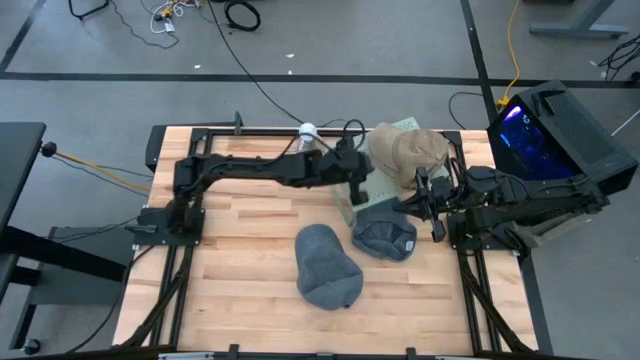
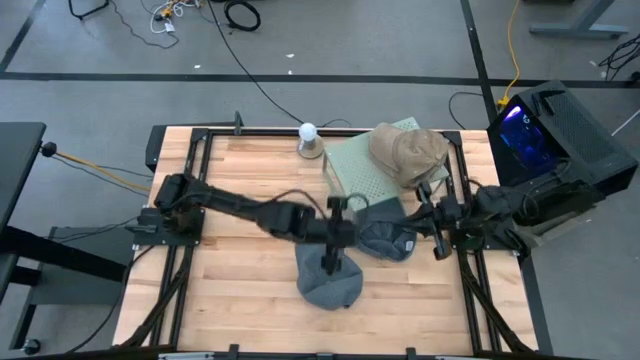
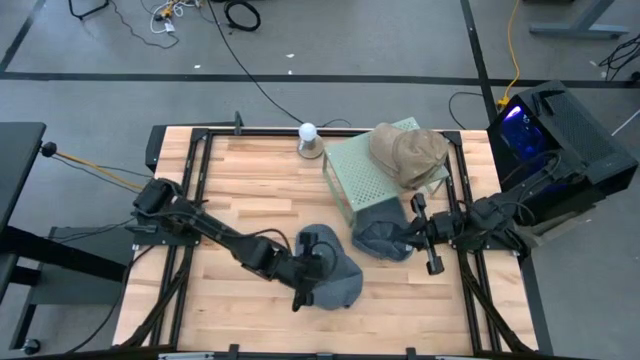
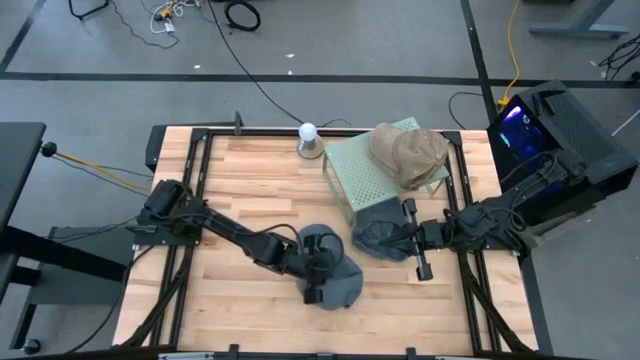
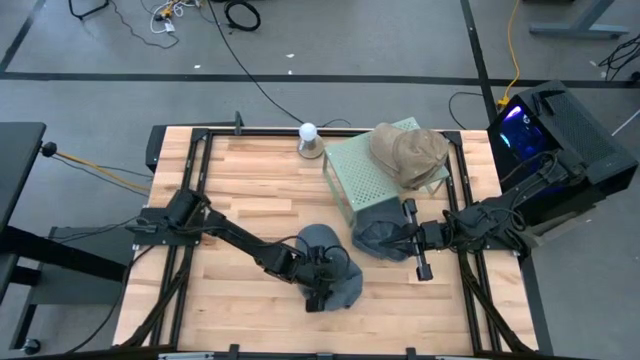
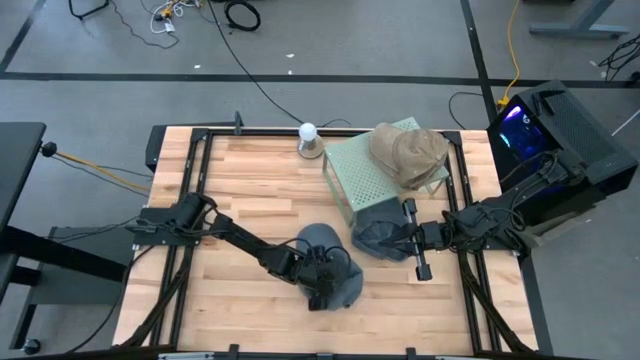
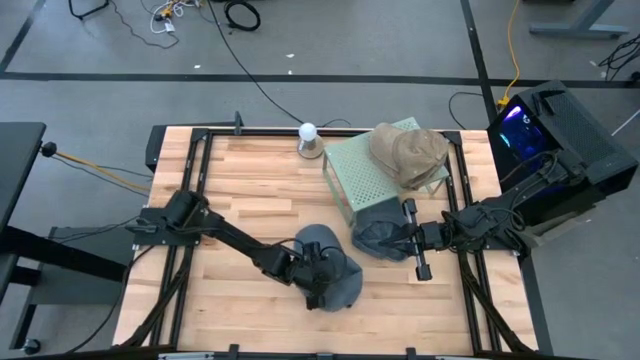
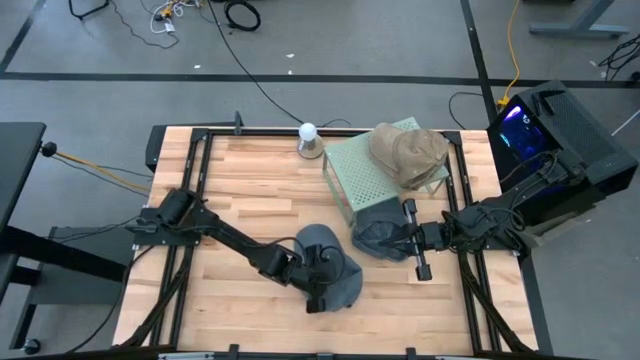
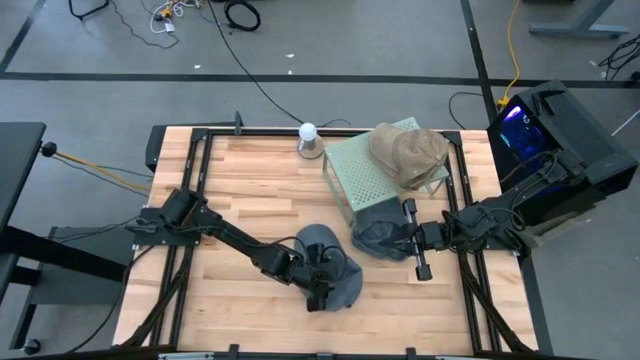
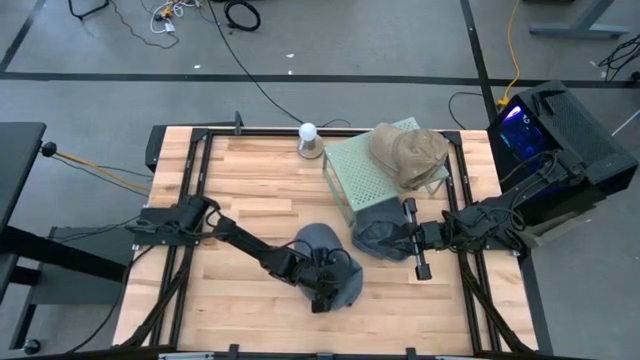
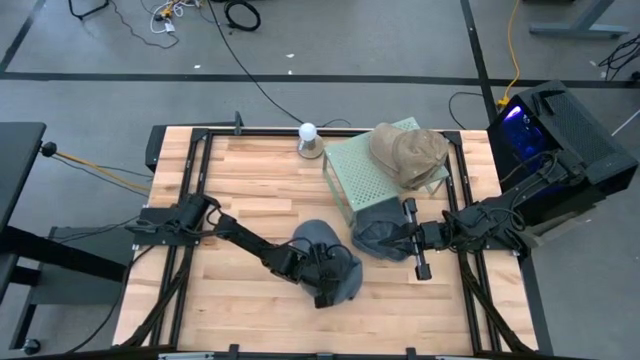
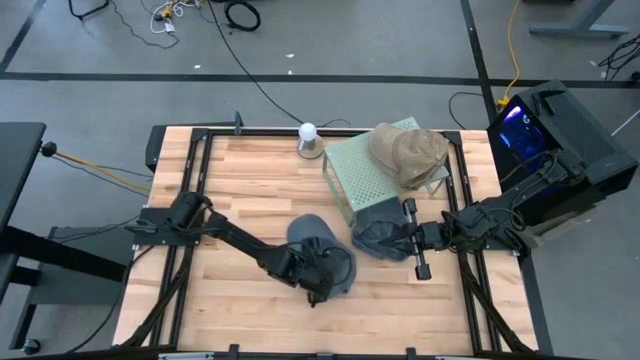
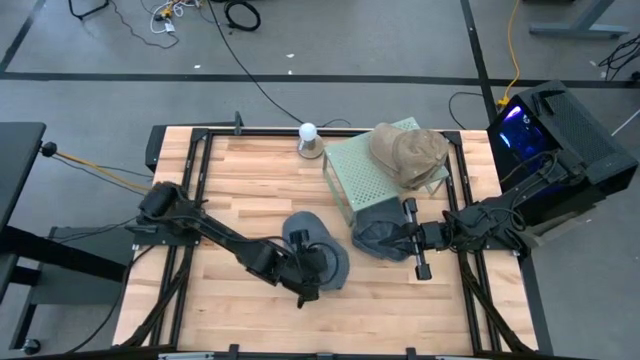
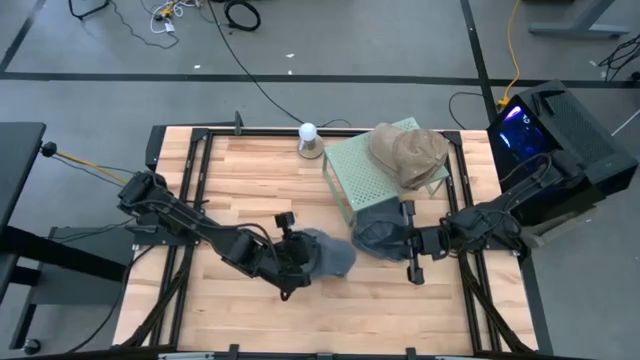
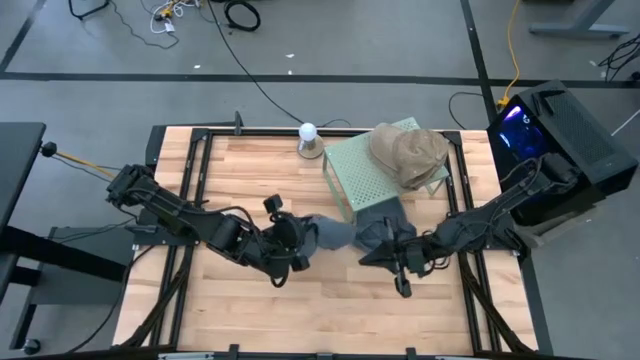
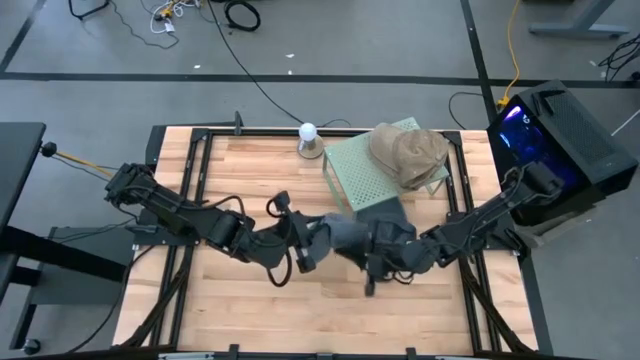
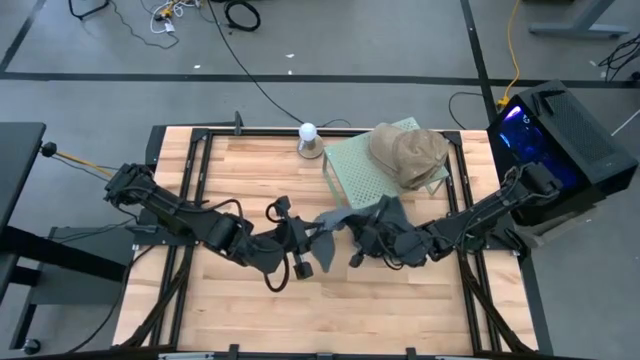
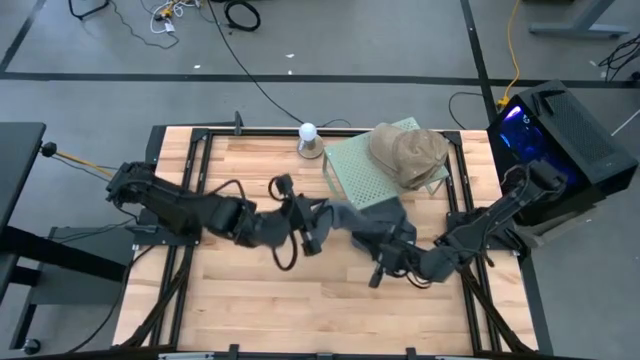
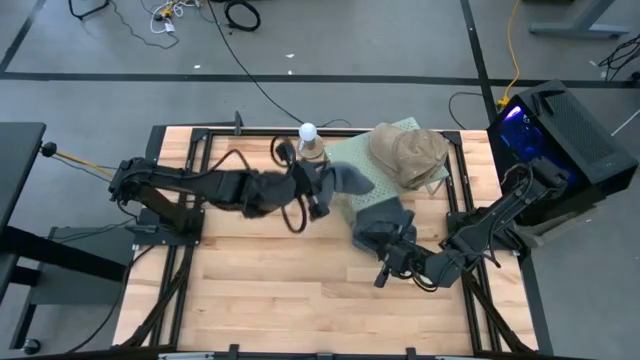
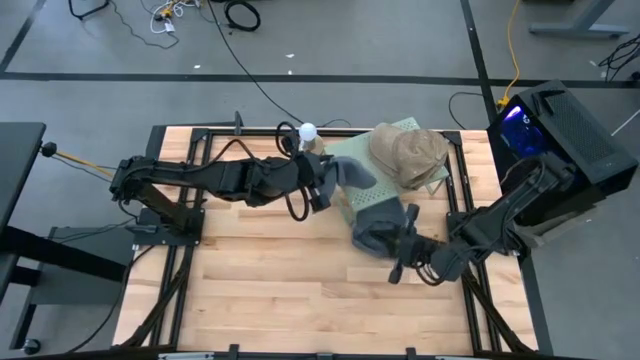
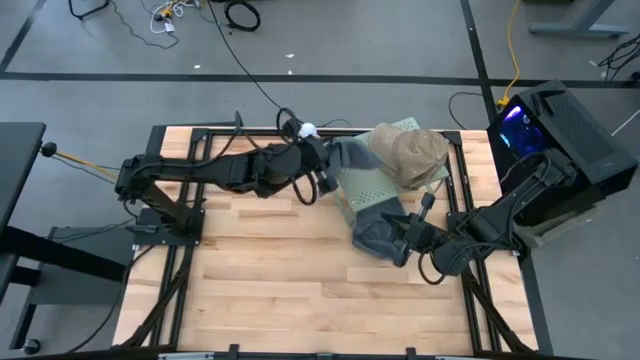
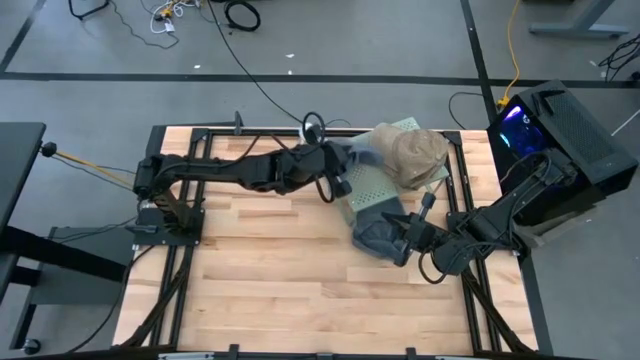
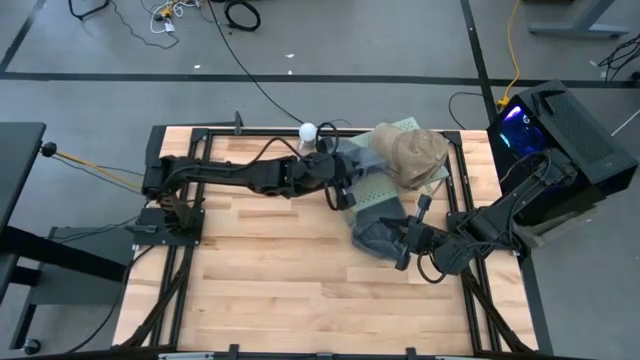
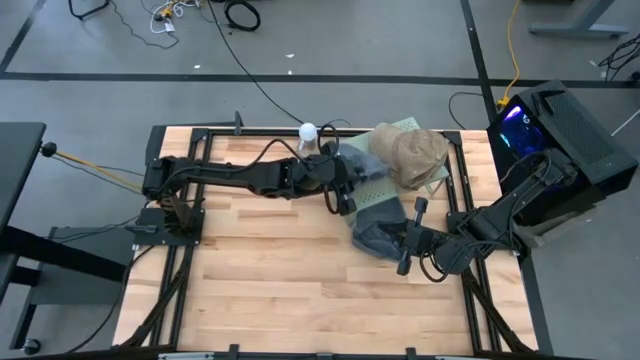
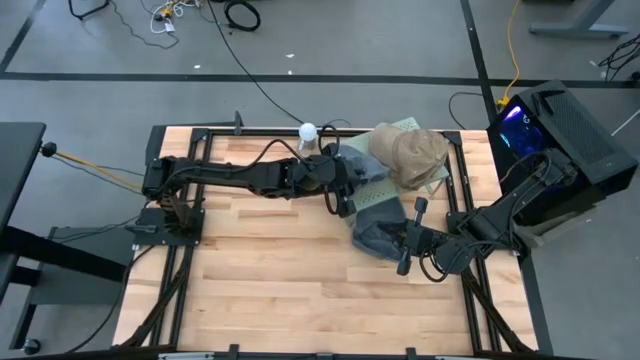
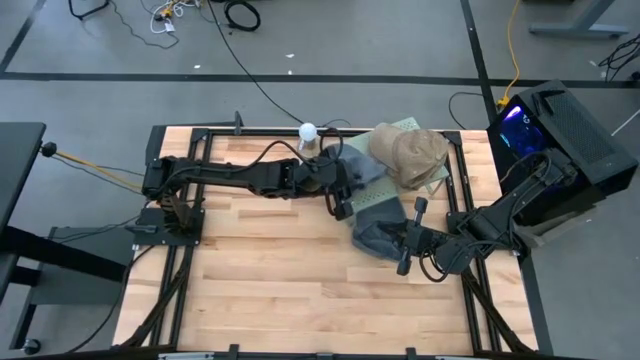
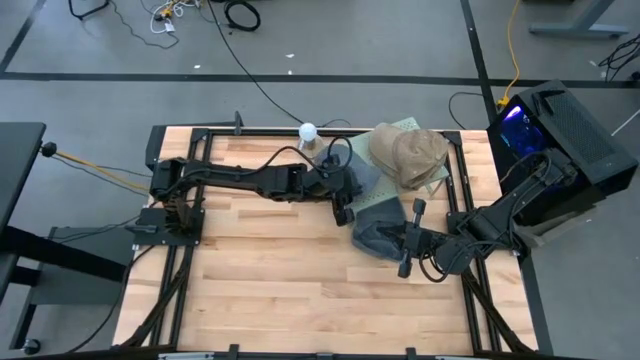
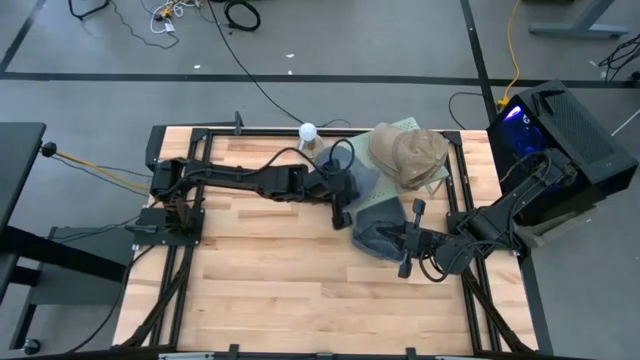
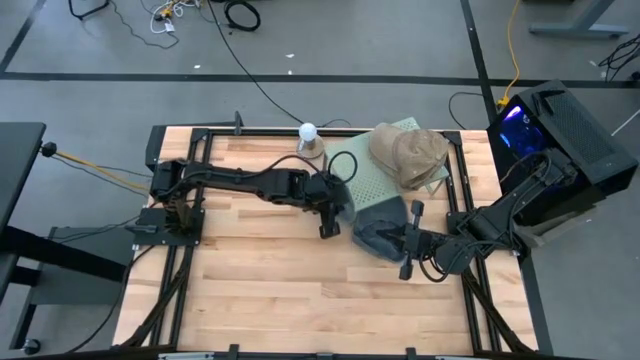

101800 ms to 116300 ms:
Task: Stack caps on shelf
Put the left black cap on the shelf

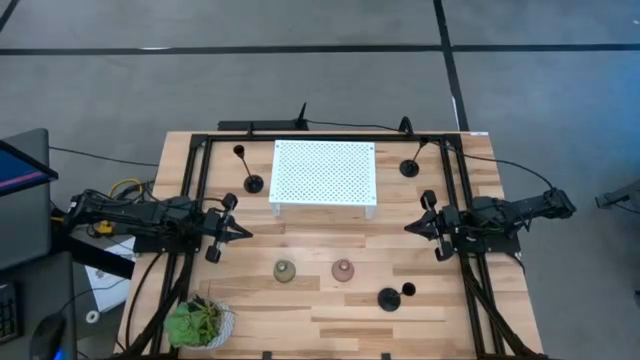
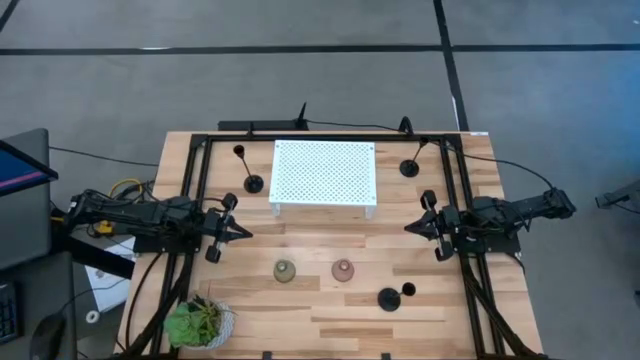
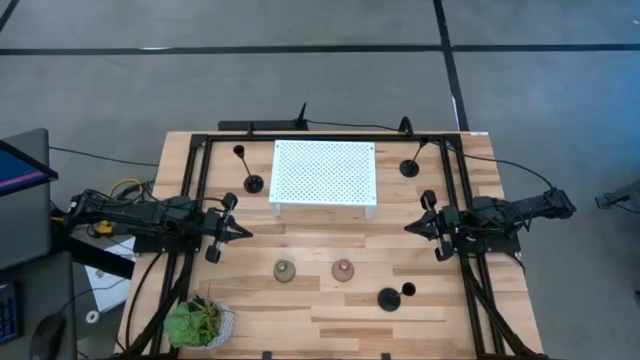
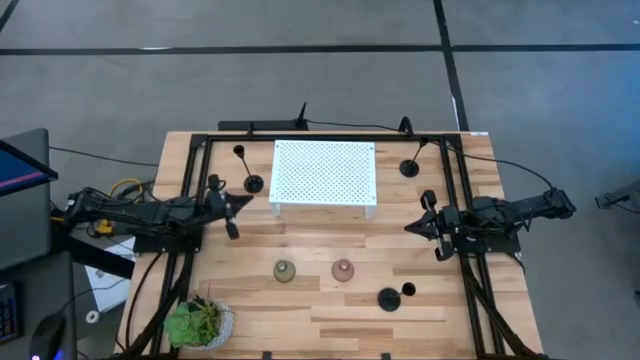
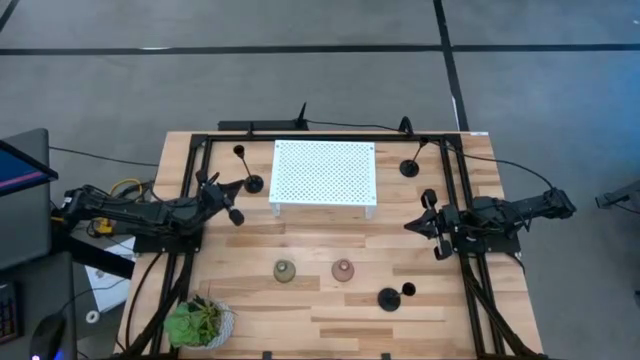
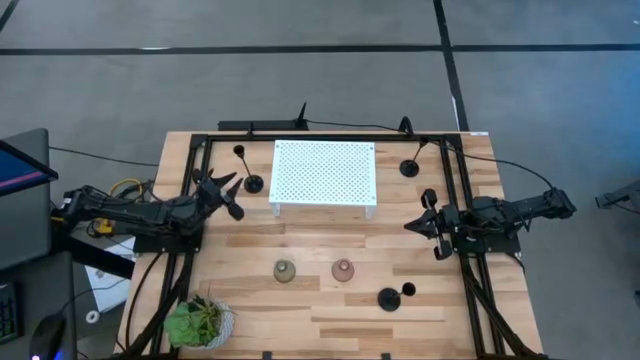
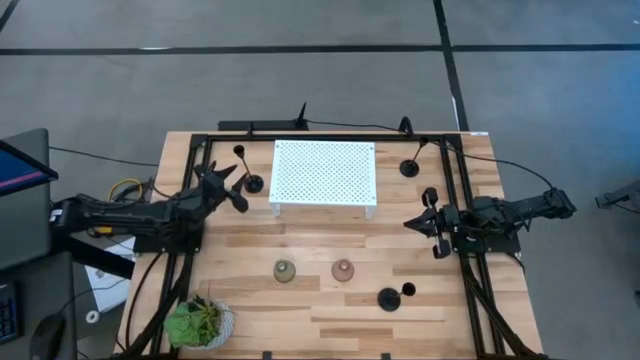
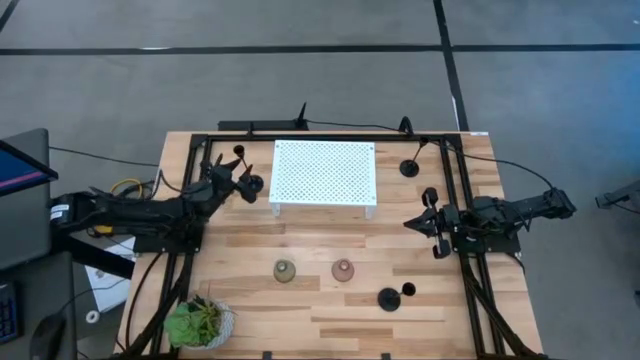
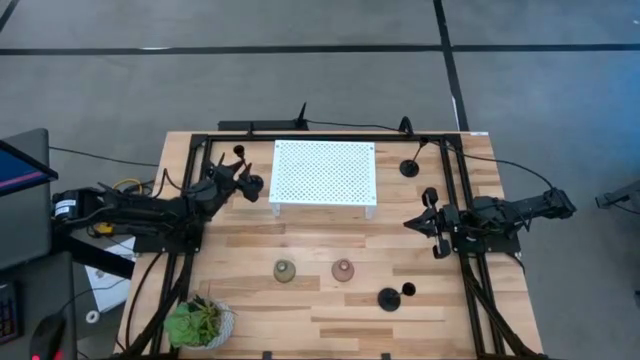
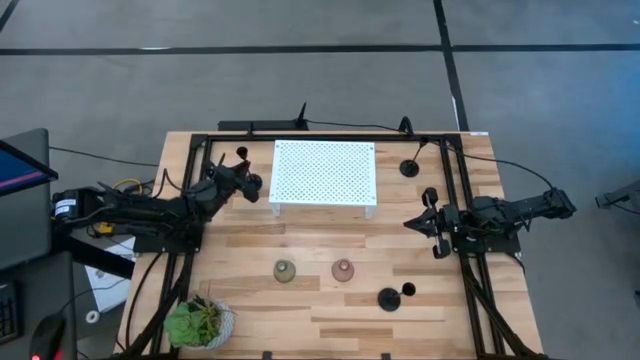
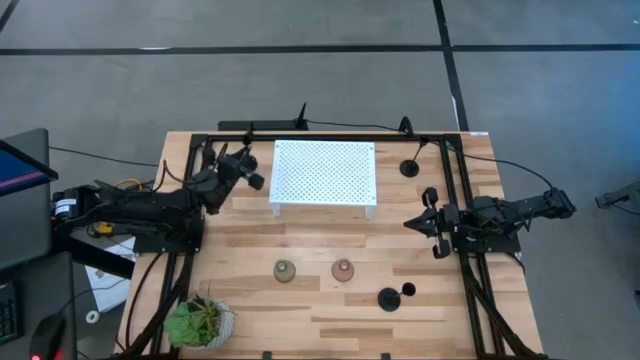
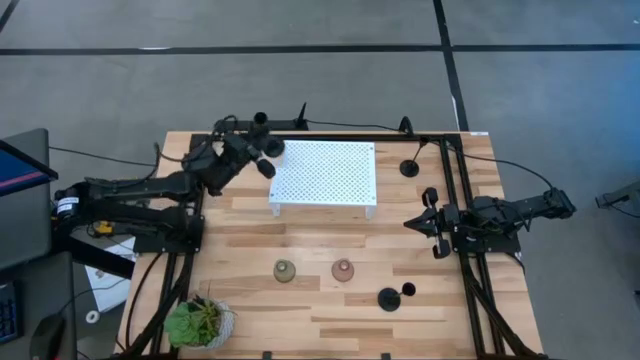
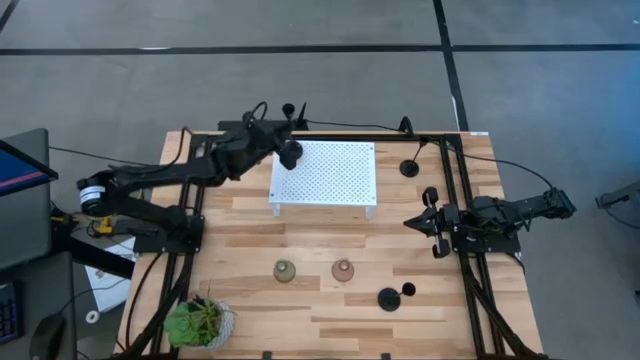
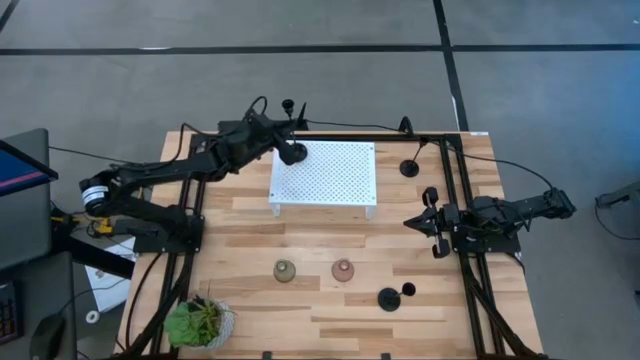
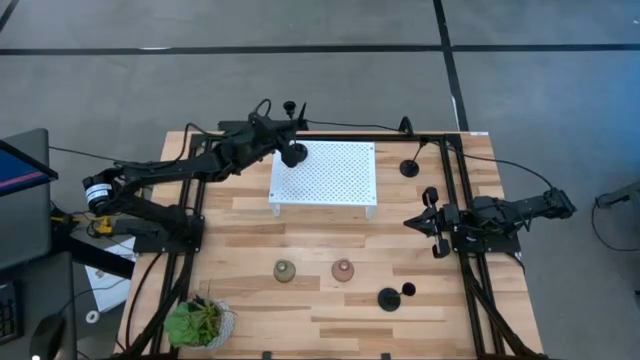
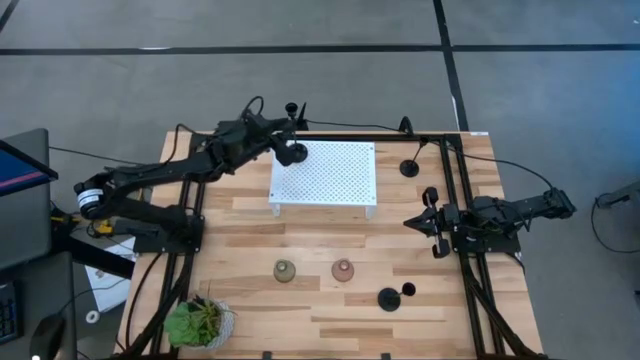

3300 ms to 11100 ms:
Task: Pick & Place candle stick holders
Put the top left black candle holder on the shelf
